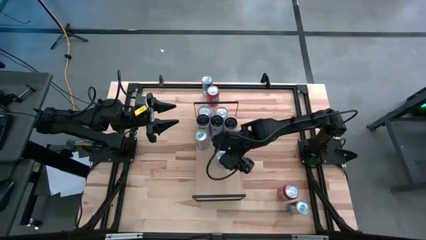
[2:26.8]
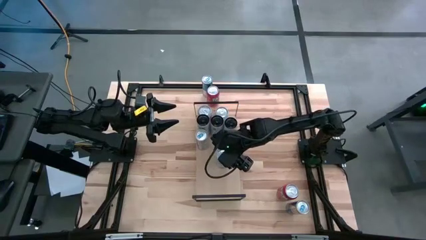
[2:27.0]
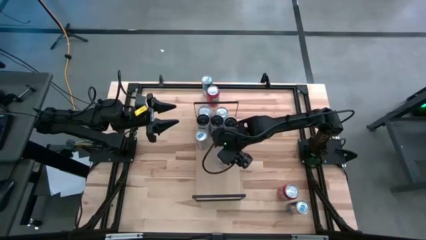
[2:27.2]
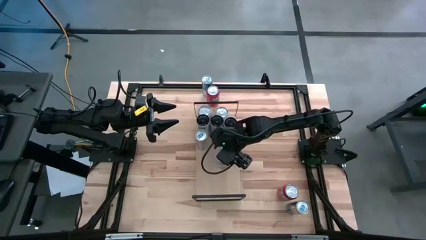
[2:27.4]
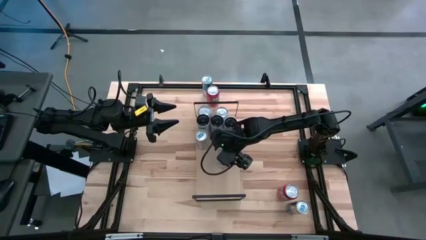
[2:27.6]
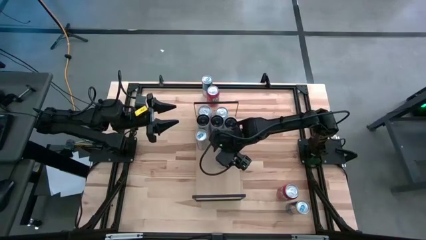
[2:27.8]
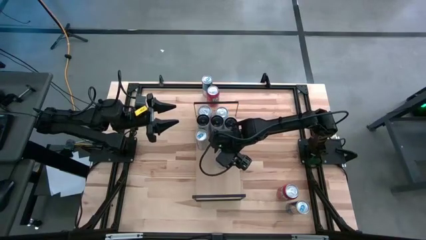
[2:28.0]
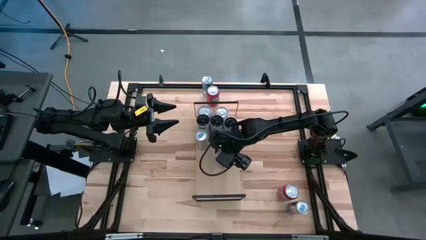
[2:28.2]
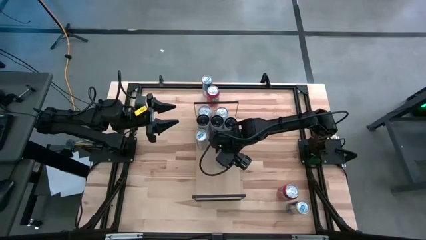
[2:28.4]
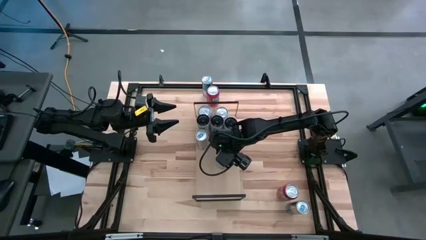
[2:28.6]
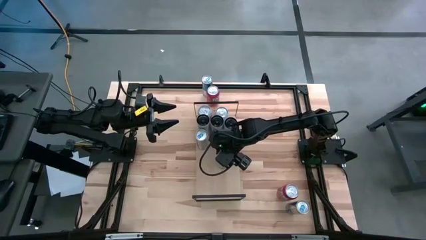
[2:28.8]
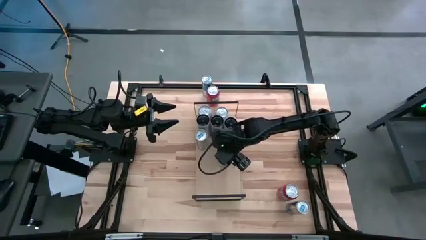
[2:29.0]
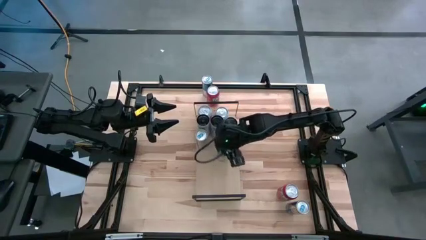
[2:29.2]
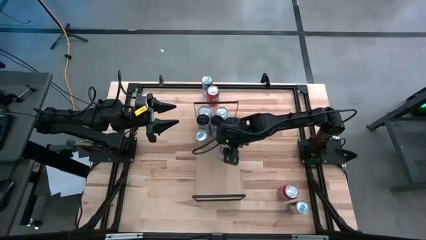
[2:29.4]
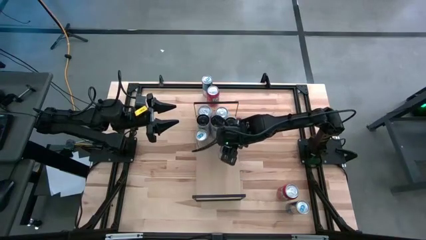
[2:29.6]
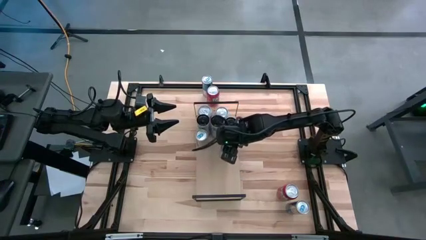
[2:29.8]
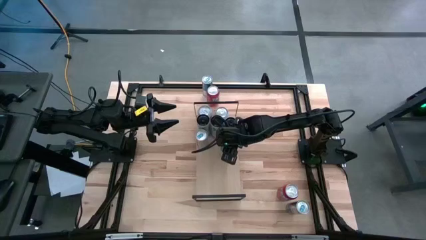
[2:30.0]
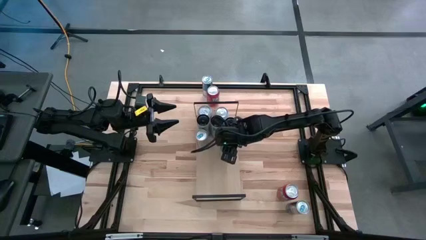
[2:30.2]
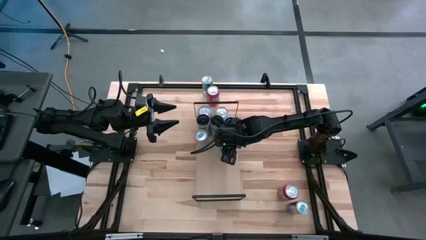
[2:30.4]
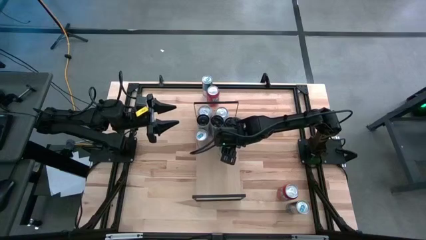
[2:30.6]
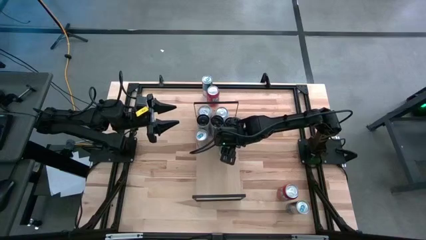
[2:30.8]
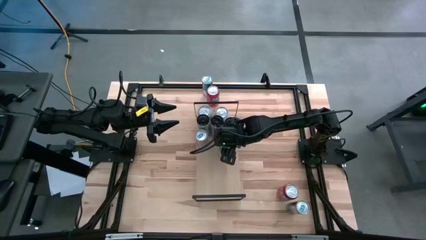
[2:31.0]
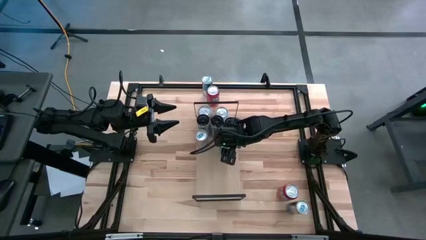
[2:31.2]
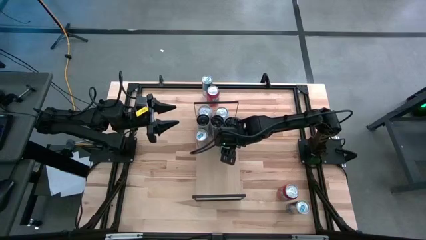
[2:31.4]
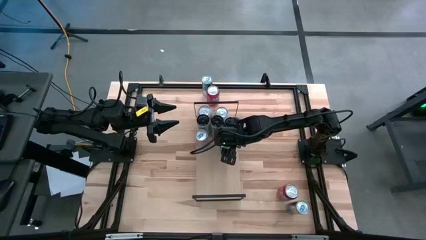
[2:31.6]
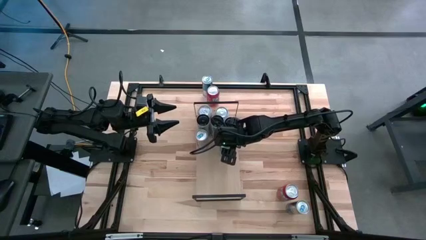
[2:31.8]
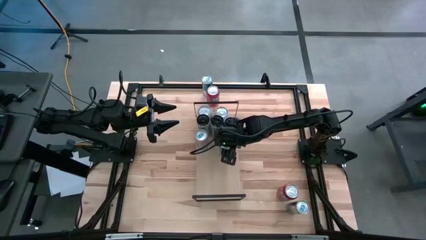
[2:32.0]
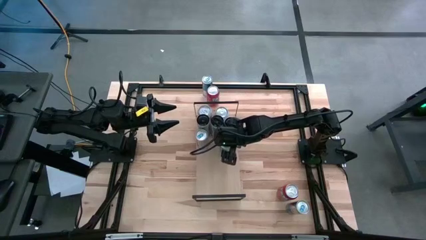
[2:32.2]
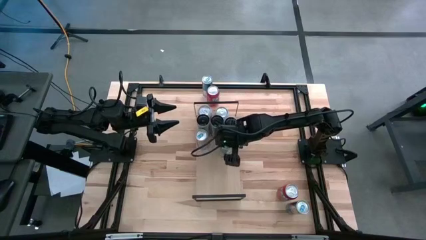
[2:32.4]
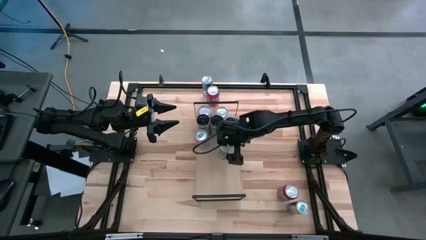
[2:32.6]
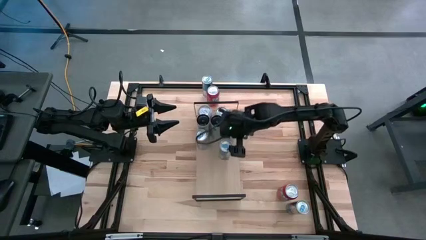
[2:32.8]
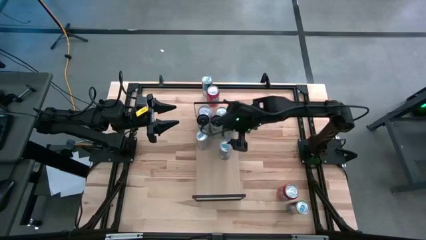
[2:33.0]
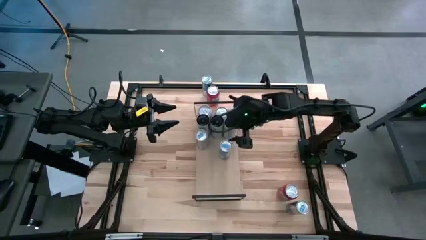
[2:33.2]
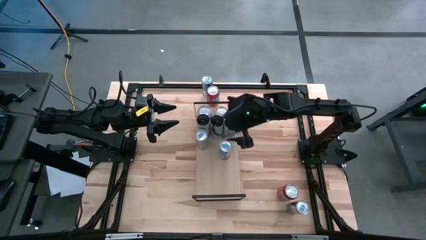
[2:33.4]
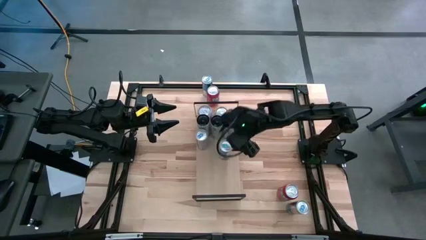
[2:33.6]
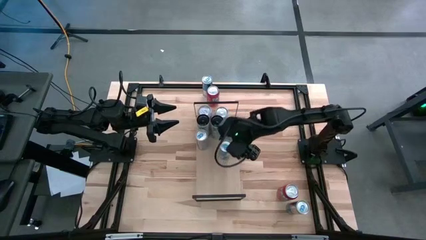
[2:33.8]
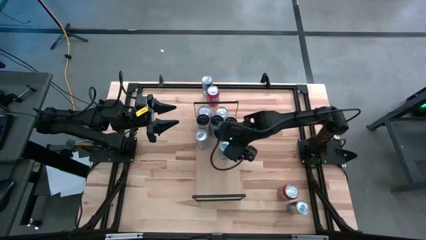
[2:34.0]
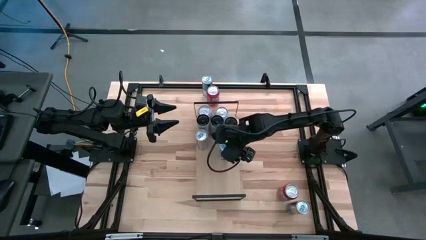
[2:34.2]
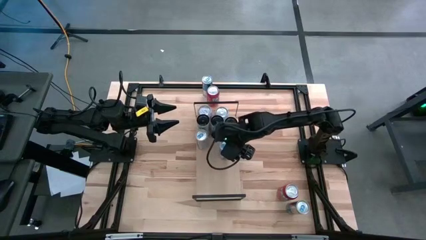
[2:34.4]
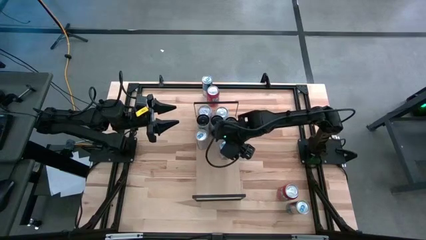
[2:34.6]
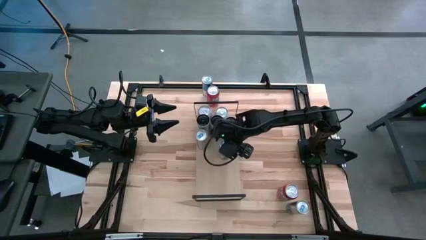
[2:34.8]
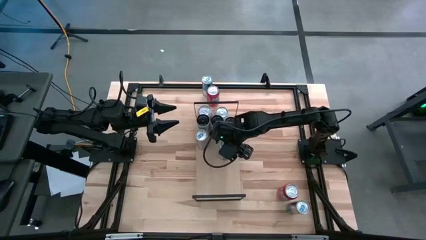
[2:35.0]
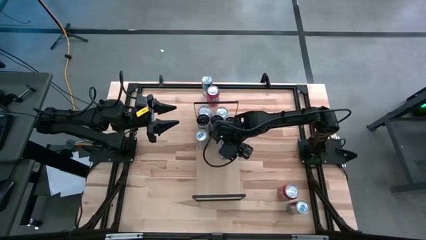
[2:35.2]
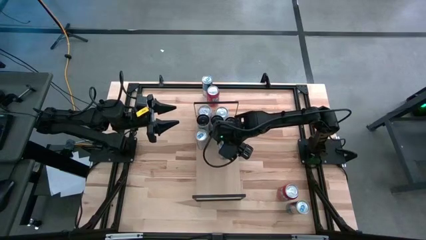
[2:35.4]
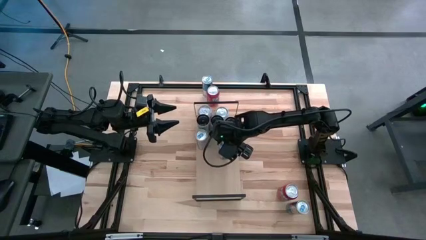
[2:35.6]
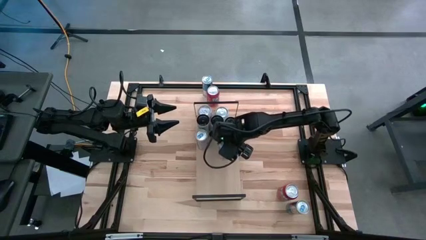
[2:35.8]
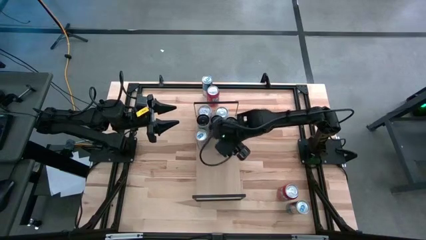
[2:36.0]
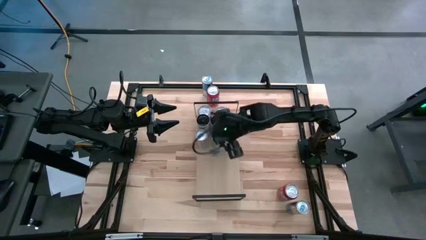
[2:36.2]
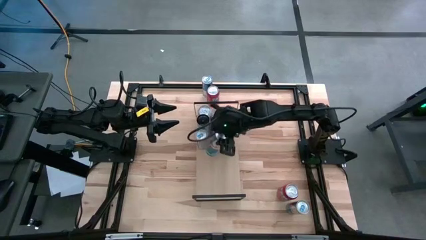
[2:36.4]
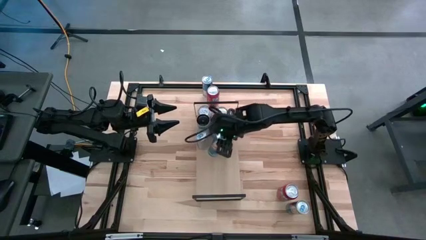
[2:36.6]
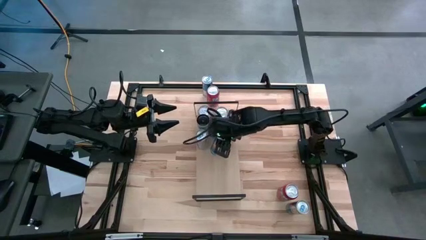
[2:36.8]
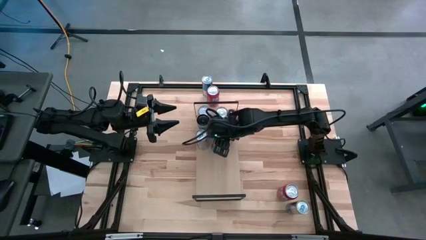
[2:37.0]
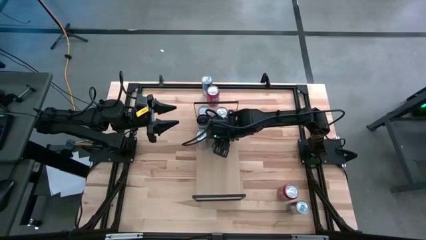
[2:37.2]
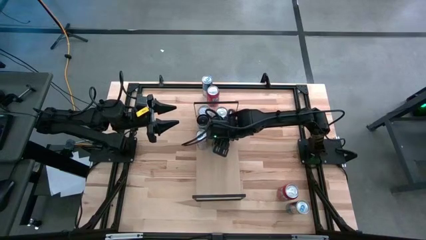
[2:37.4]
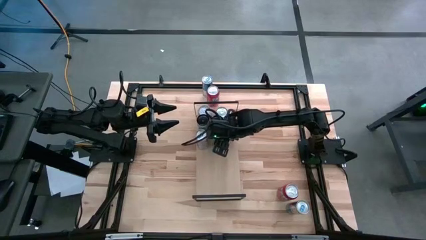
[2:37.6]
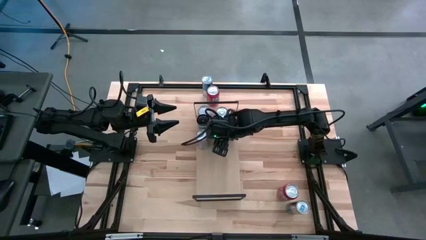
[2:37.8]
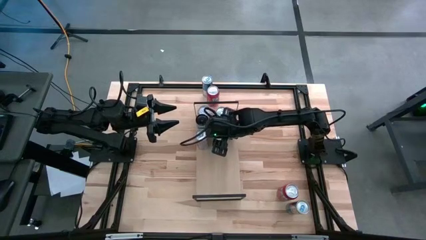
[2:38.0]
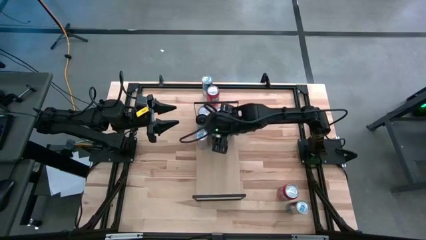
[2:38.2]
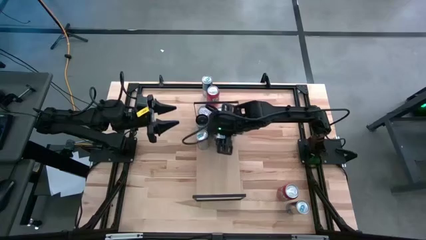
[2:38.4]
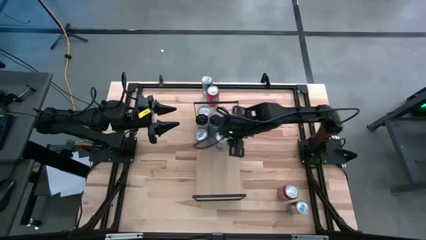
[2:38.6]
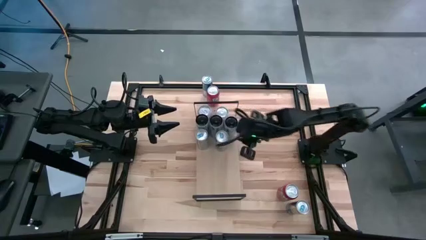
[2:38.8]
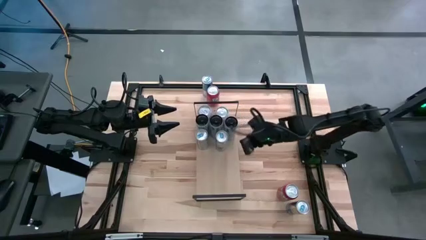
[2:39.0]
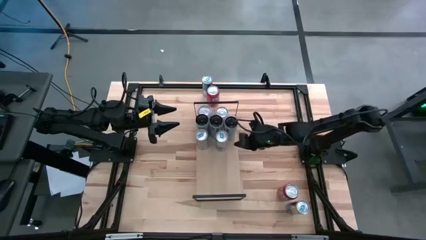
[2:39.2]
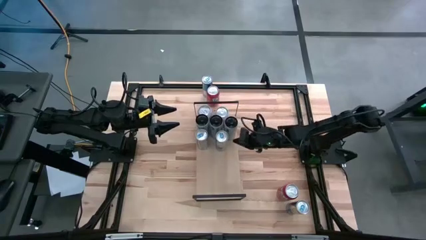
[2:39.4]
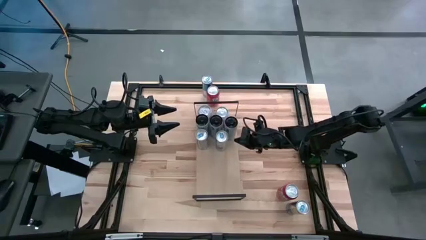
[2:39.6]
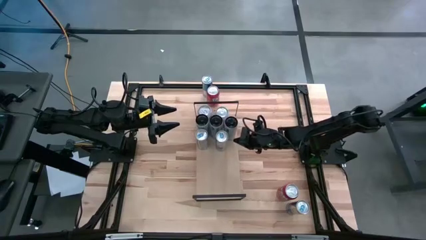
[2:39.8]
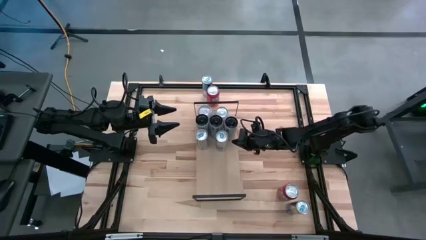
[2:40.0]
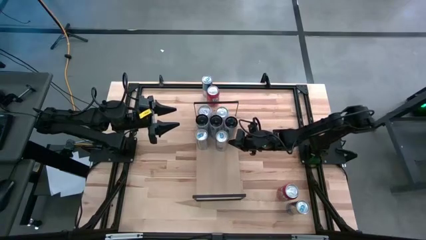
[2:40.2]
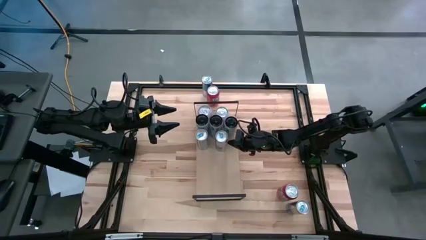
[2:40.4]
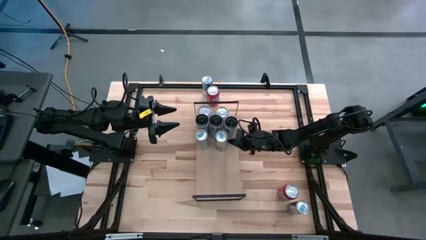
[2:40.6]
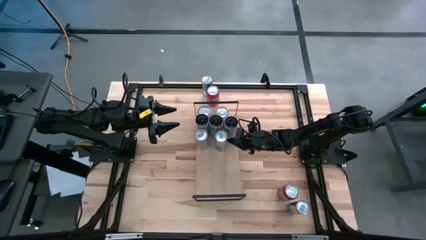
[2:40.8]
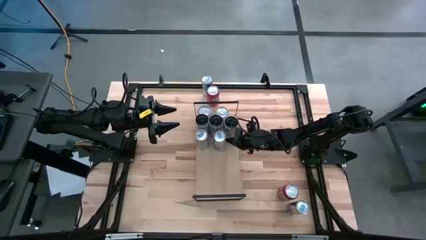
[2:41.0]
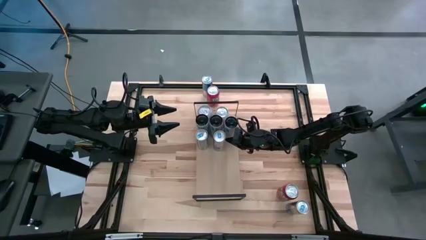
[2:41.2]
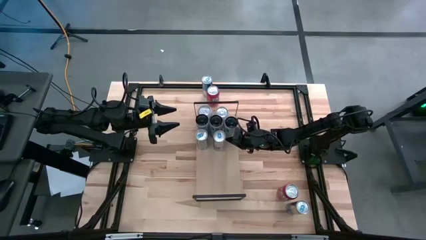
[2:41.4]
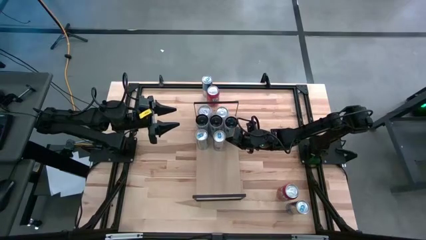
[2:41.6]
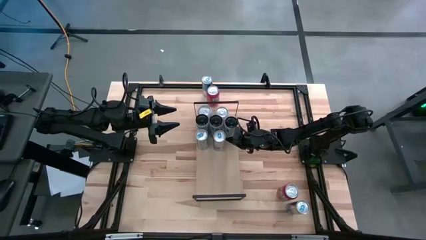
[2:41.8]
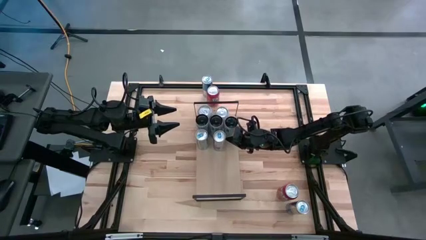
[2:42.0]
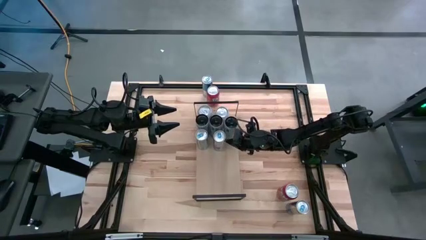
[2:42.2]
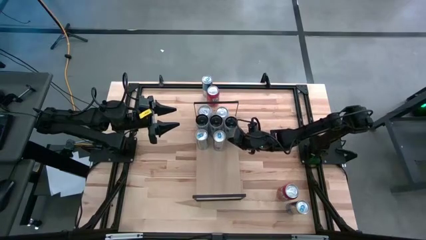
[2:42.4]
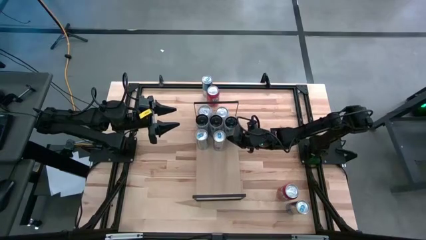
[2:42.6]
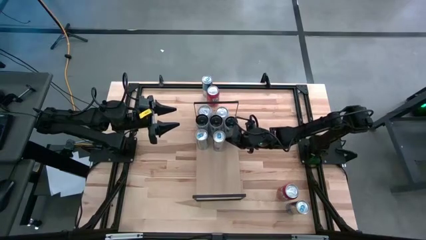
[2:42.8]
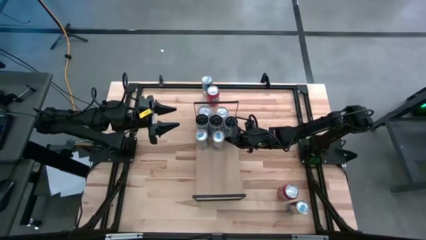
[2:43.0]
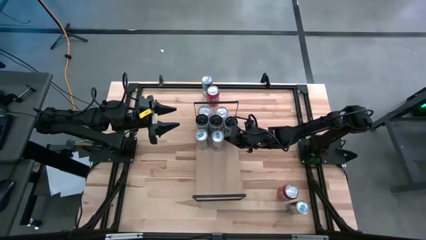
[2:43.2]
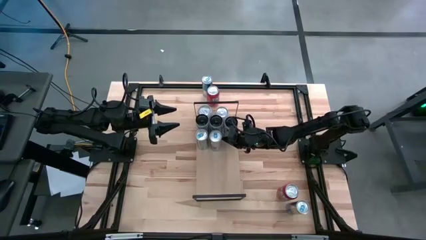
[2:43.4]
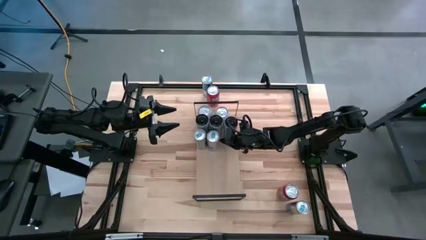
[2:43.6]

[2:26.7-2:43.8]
Task: Place canned beverage on shelf
Put the top right blue soda can on the shelf aligned with the other blue soda can
